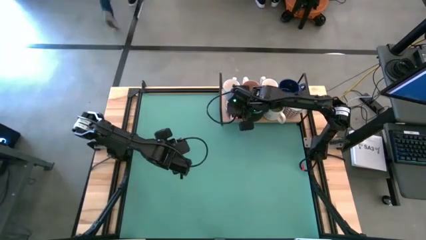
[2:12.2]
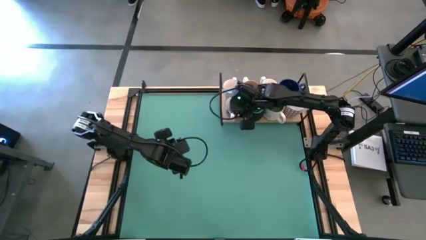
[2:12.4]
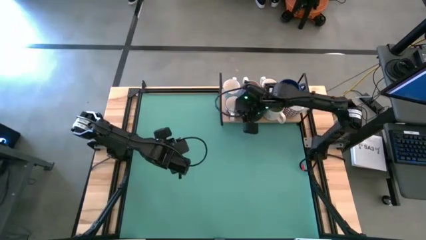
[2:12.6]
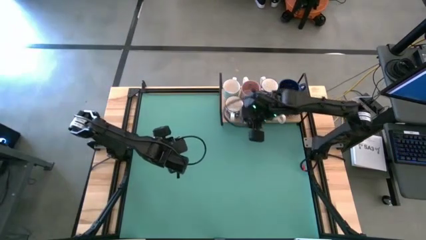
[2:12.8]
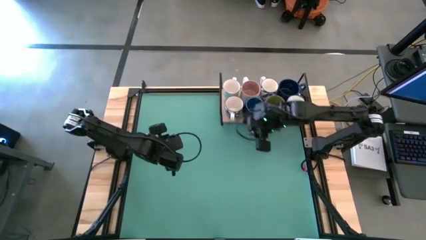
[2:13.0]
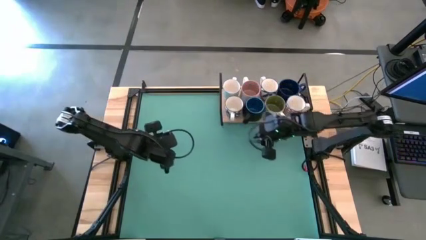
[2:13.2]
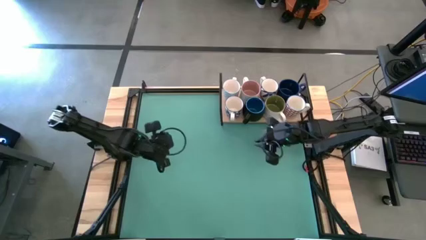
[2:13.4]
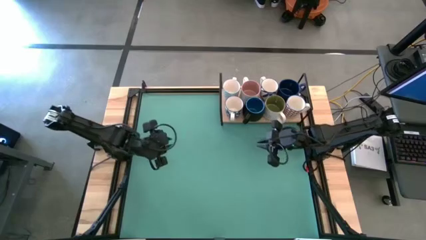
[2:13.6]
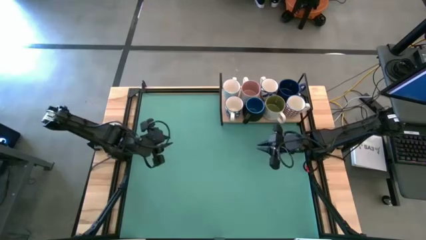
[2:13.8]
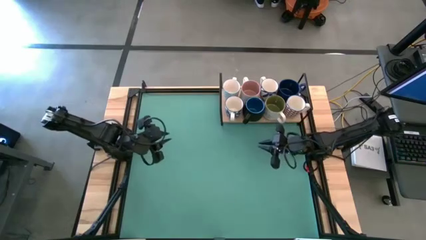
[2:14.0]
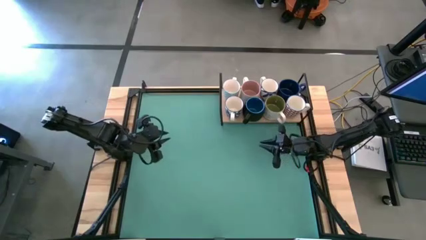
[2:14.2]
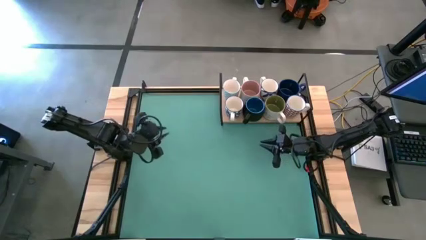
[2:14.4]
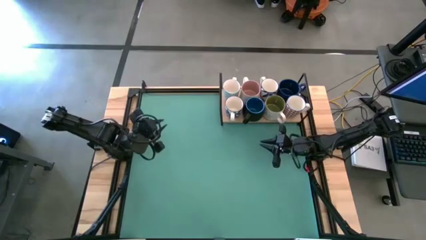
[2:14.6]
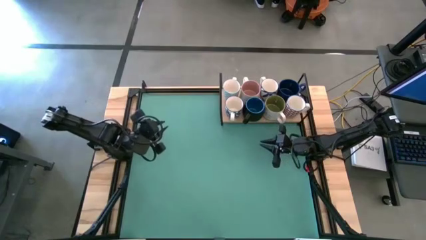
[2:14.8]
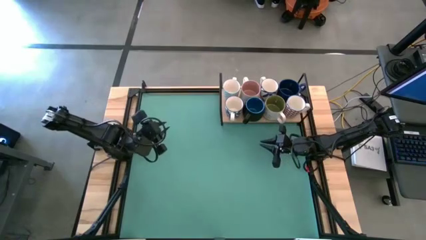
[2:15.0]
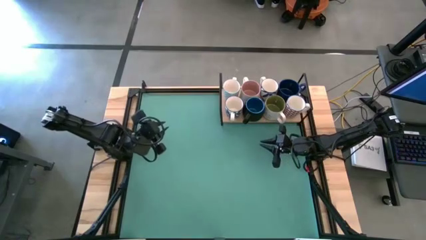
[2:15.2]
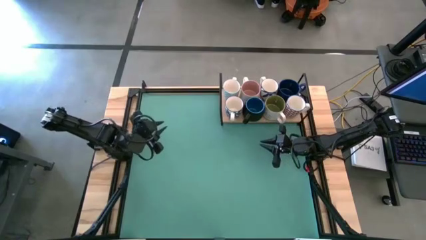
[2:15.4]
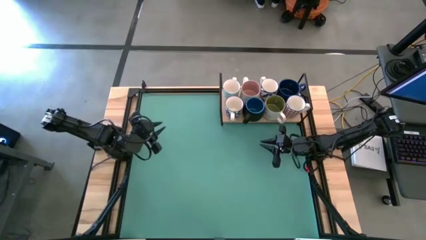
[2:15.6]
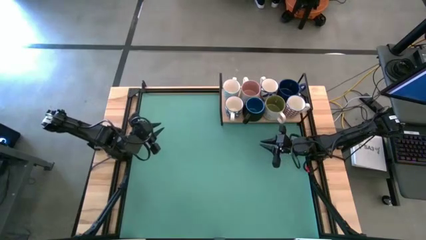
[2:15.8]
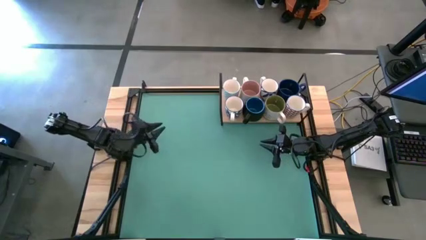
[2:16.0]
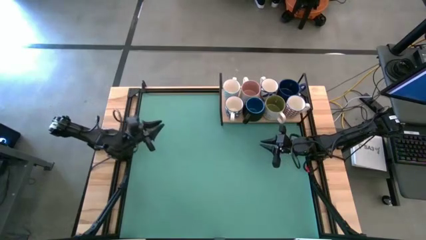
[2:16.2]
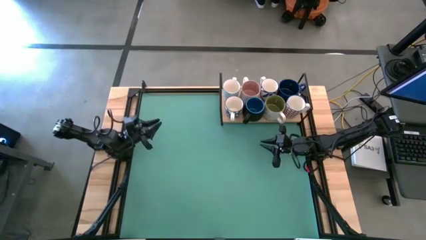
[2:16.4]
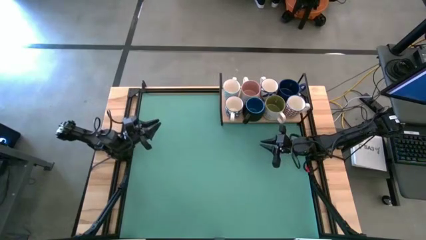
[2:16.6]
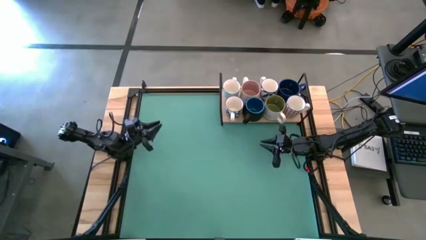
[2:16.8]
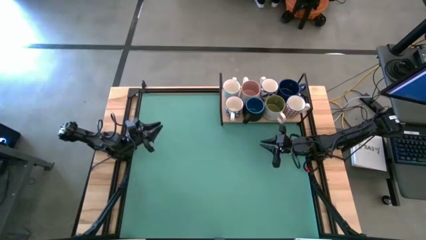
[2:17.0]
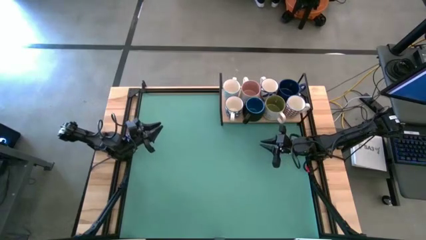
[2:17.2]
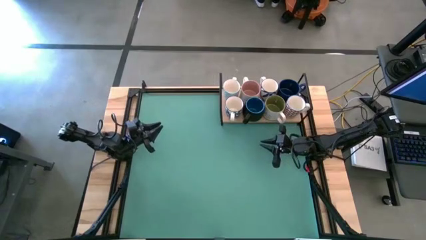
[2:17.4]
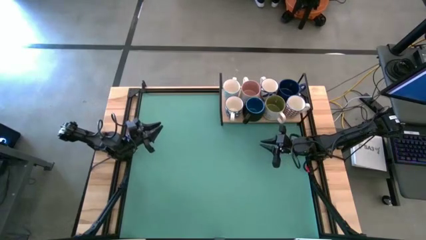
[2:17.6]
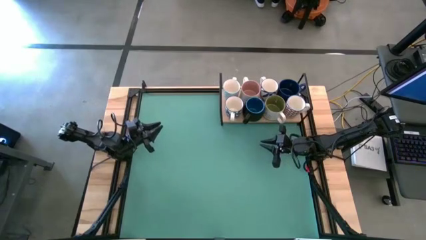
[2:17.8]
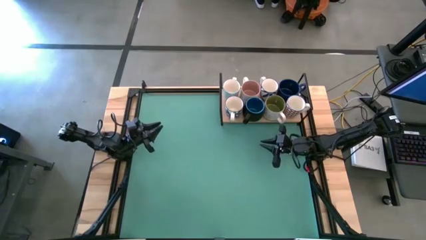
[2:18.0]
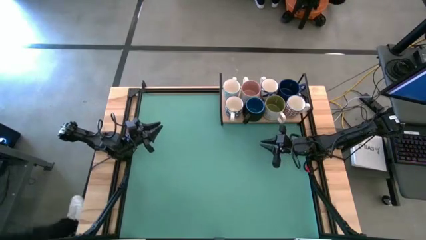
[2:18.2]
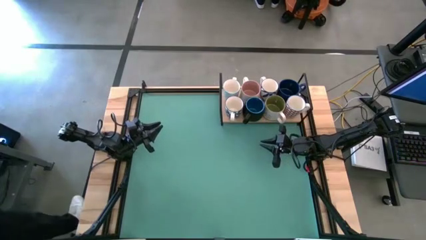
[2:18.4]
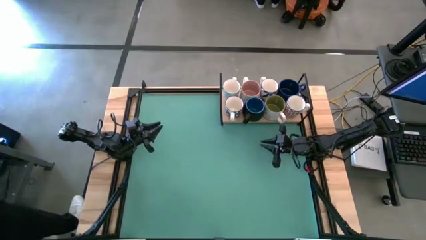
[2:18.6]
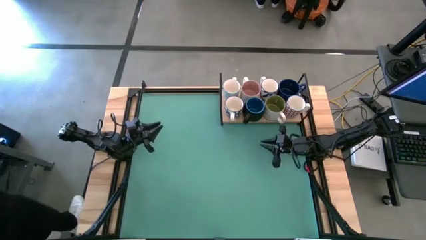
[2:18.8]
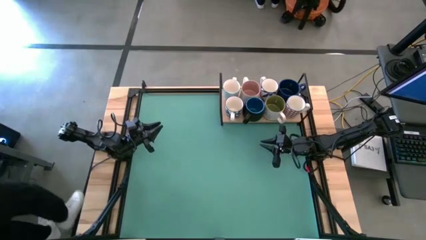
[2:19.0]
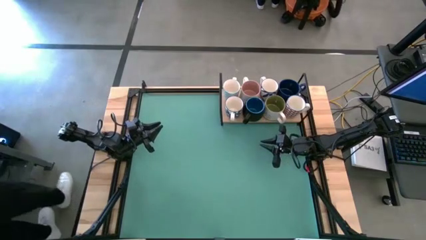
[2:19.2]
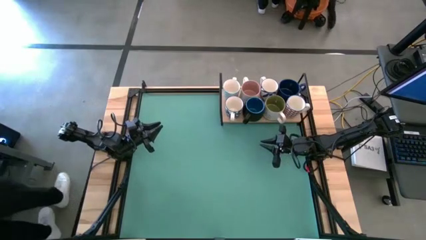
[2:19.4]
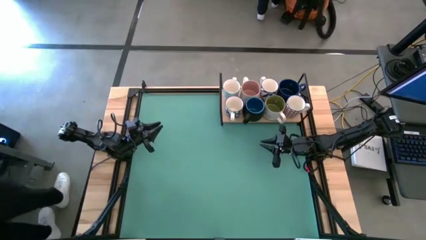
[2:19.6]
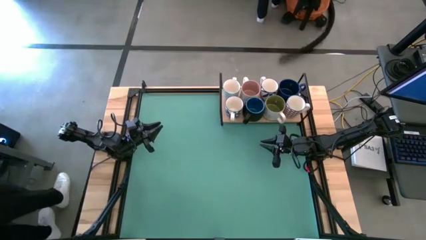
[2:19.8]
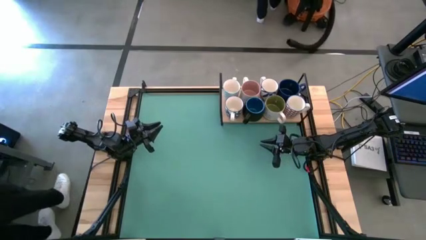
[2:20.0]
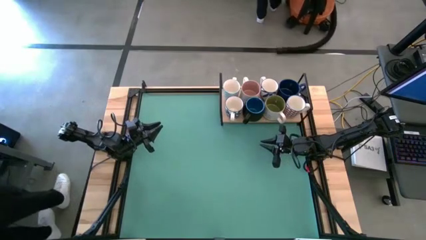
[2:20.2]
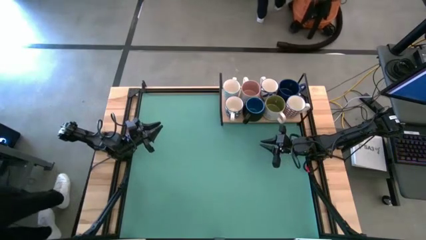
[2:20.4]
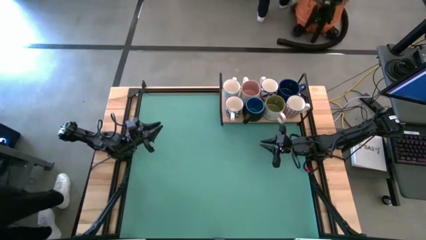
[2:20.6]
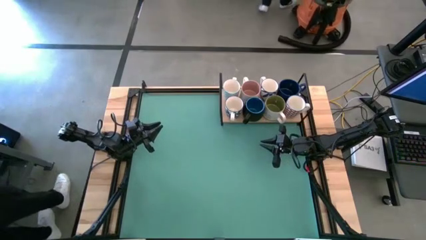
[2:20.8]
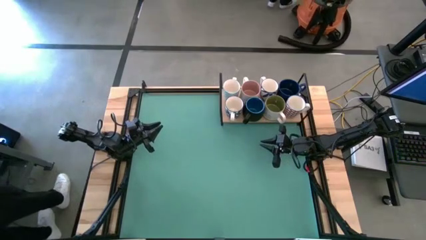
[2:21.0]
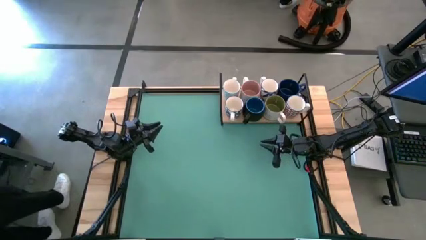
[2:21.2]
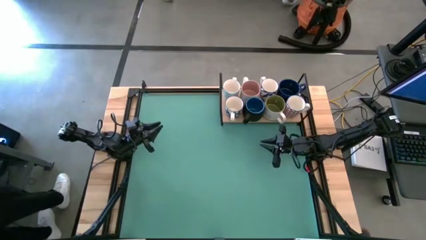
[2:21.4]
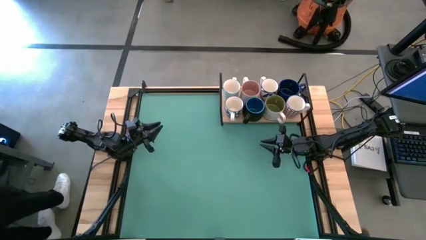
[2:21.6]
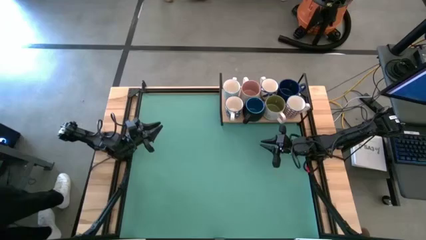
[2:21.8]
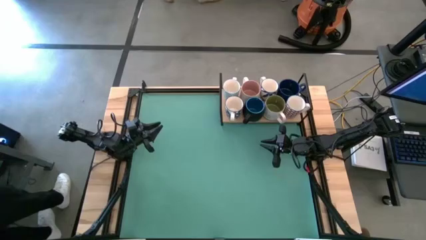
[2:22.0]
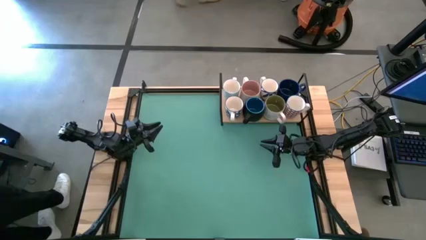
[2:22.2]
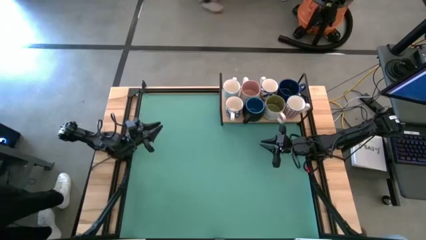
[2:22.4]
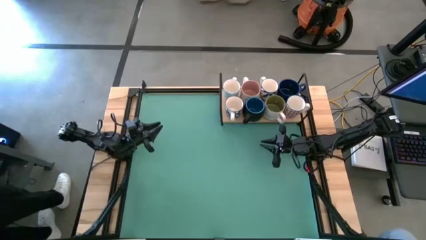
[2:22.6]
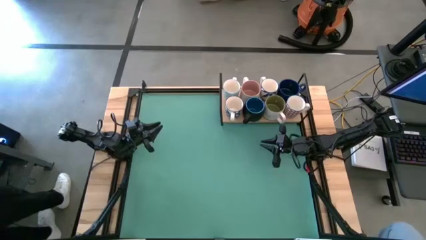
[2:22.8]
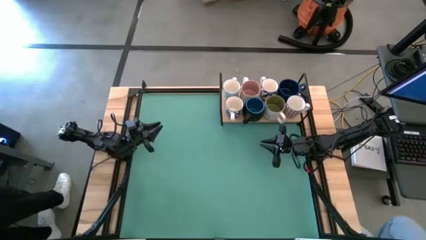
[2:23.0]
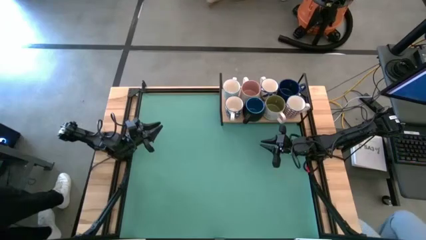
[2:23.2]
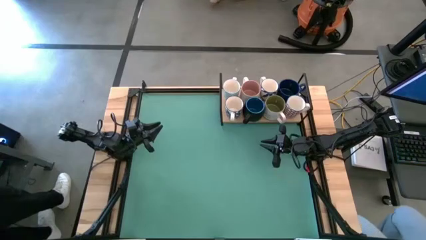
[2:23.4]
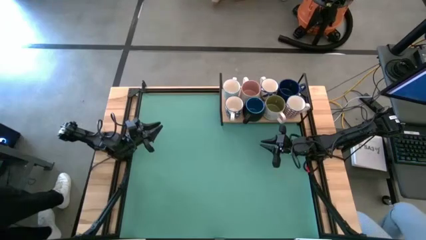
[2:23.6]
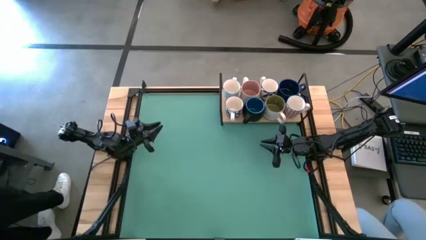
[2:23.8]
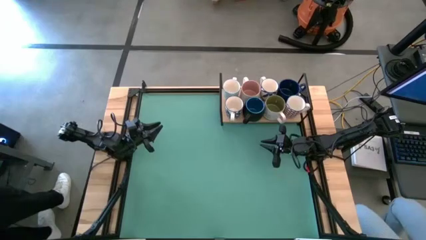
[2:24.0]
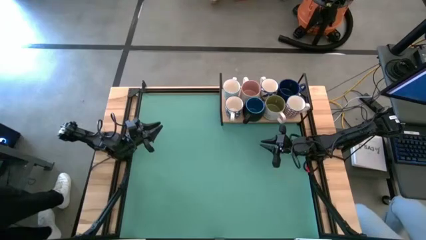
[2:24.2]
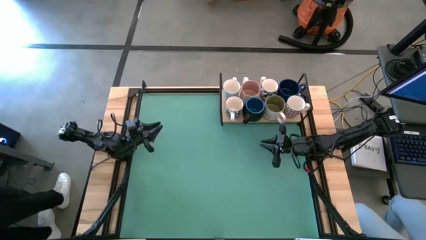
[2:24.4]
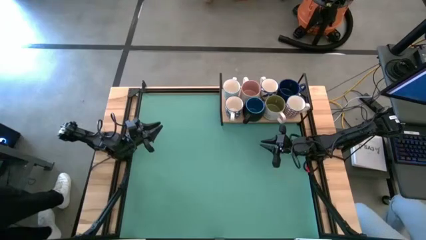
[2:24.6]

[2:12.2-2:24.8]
Task: Place coffee mugs
Return to Home Position
